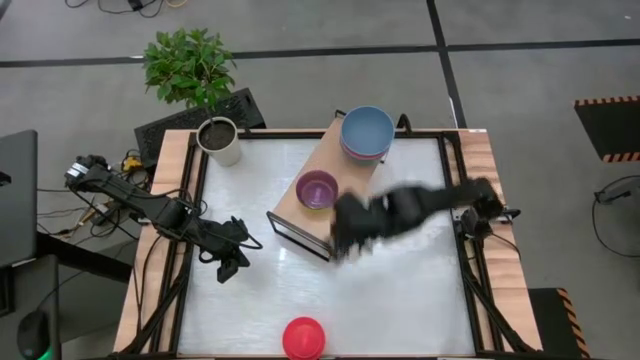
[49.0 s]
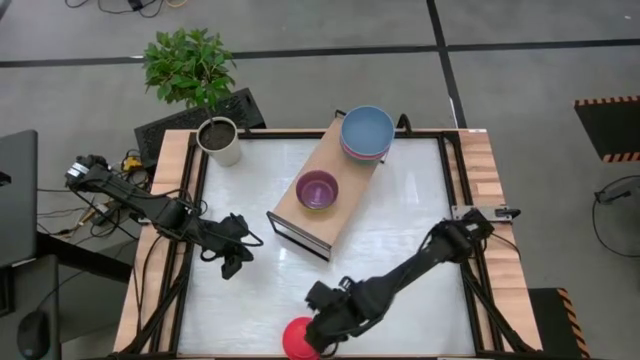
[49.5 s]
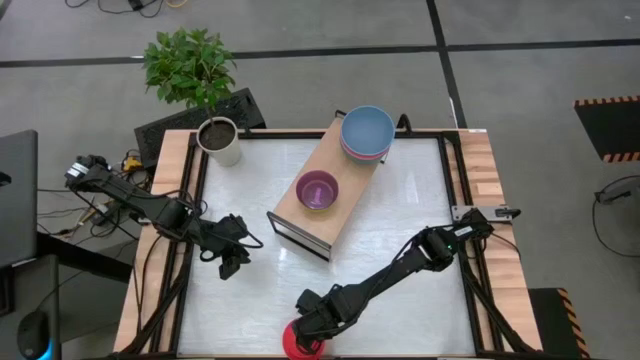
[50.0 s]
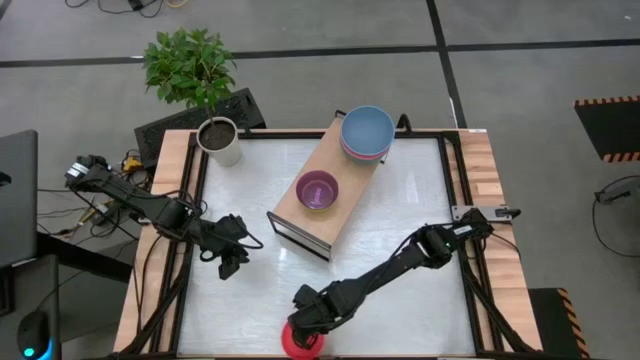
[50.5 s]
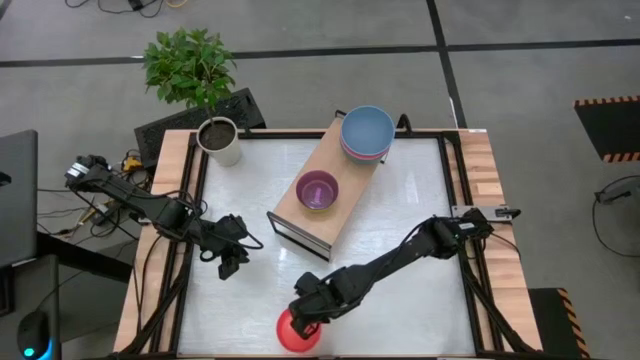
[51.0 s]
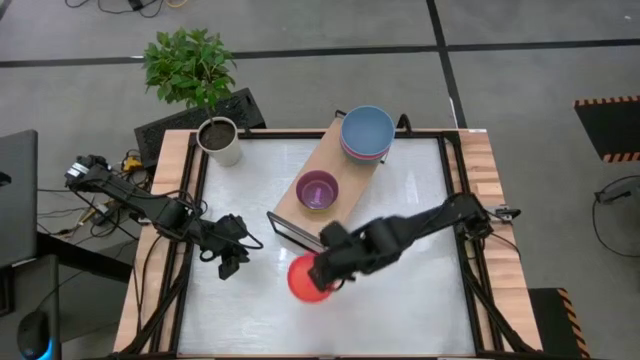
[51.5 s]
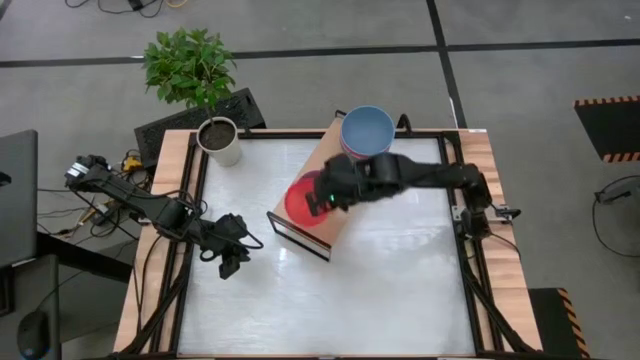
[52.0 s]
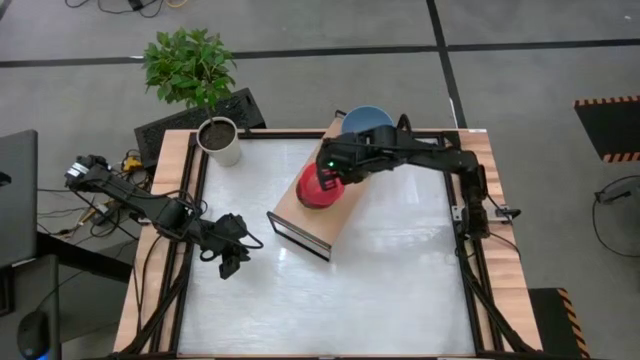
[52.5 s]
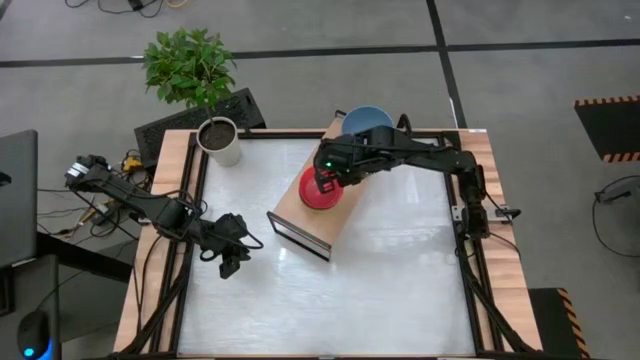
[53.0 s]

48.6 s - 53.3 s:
Task: Place and stack bowls onto a shelf
Stack the orange bowl into the purple bowl

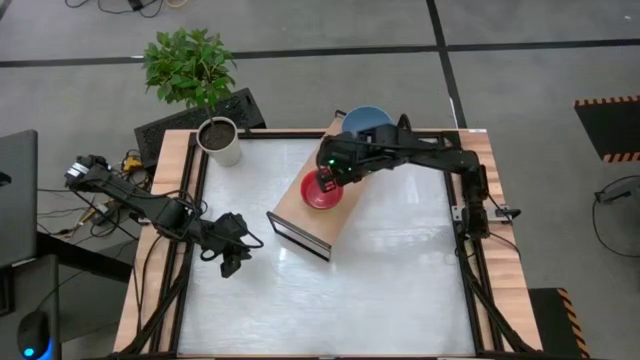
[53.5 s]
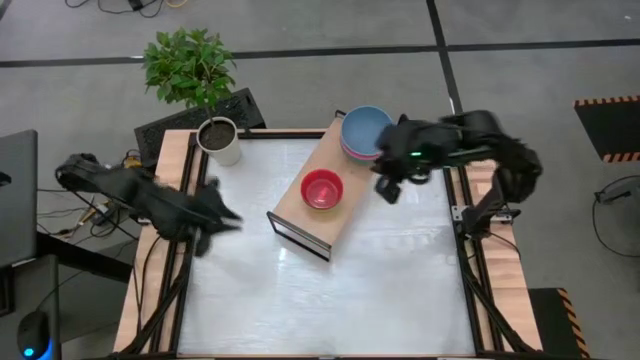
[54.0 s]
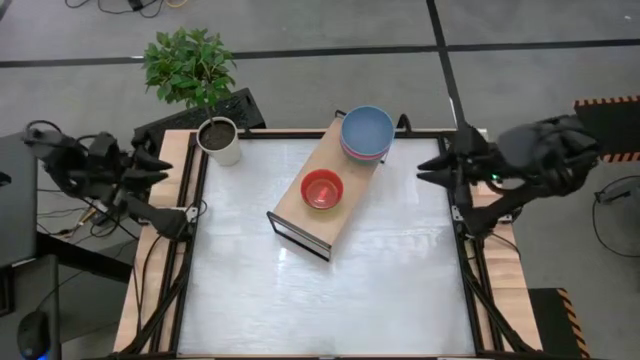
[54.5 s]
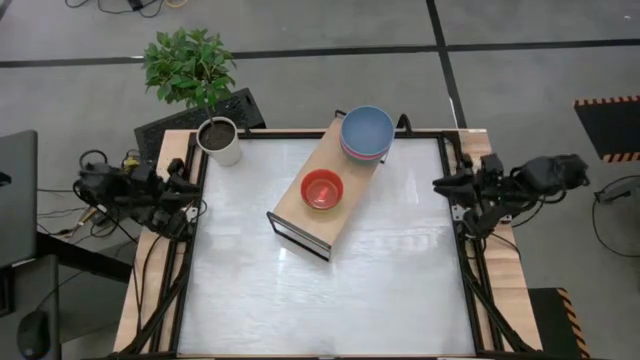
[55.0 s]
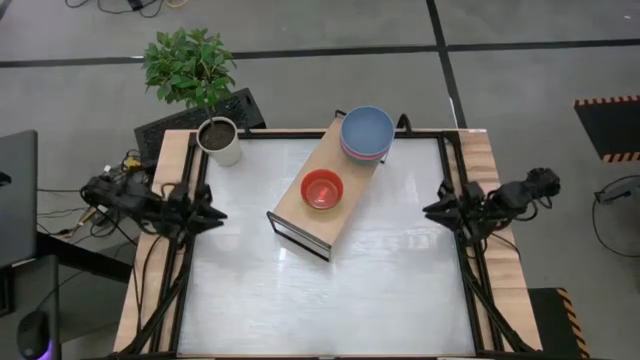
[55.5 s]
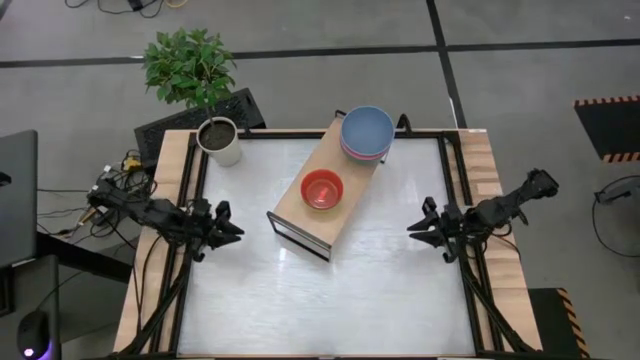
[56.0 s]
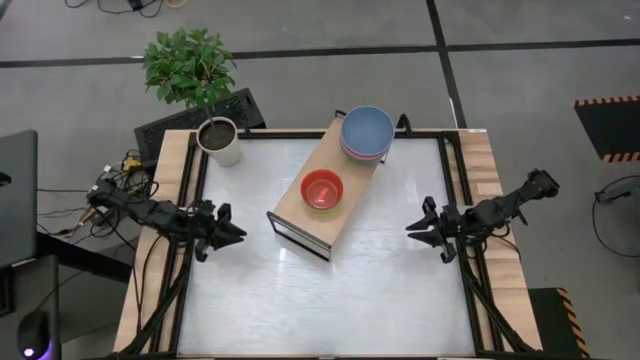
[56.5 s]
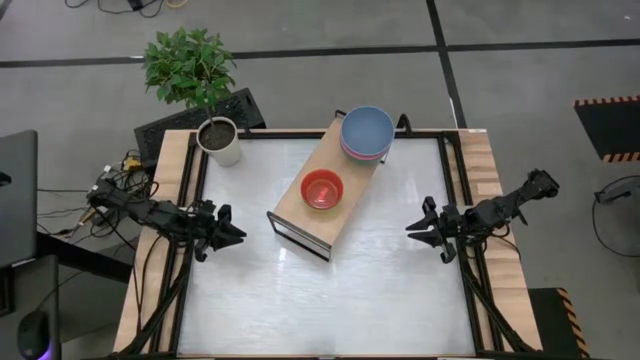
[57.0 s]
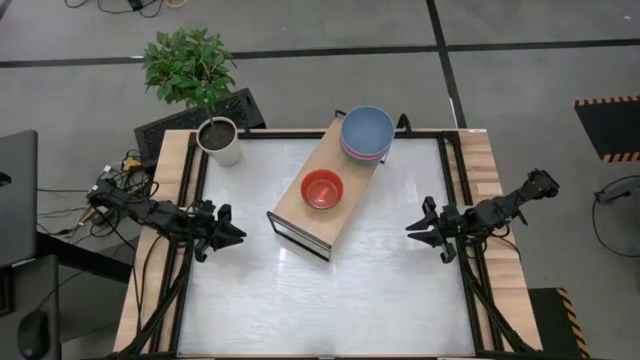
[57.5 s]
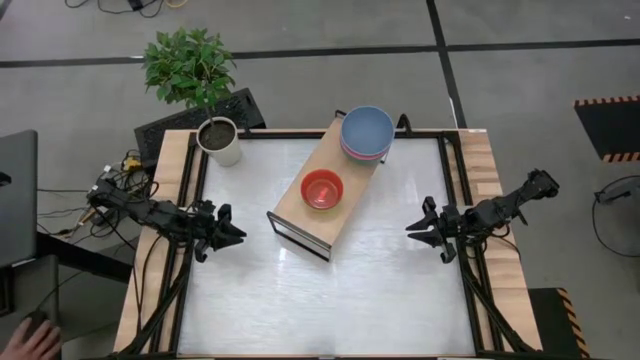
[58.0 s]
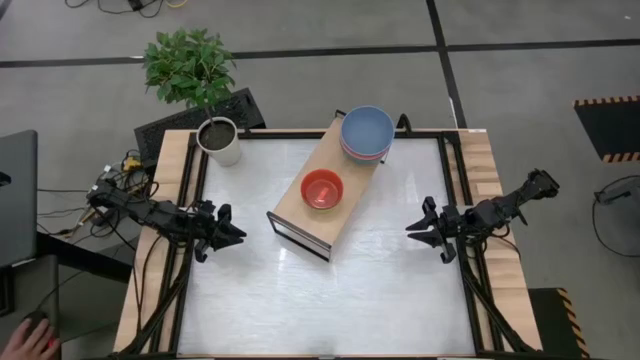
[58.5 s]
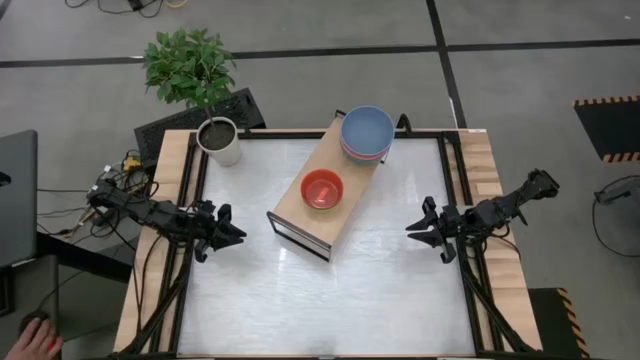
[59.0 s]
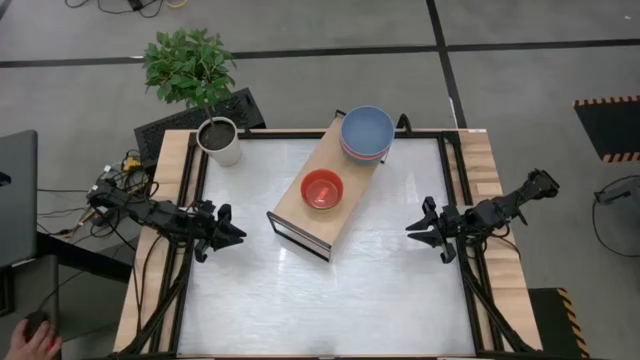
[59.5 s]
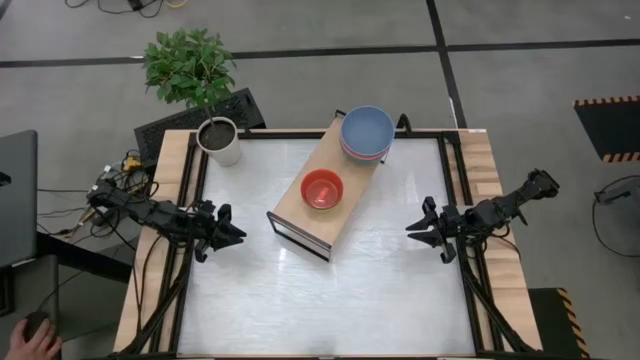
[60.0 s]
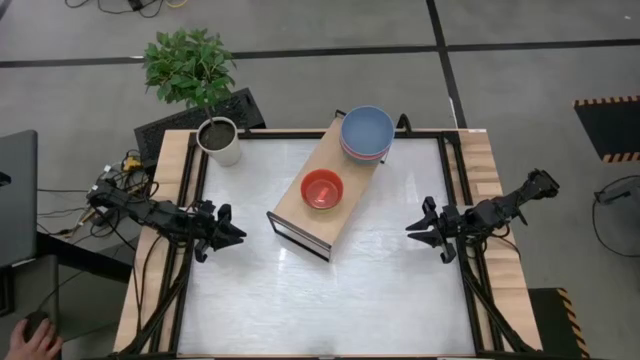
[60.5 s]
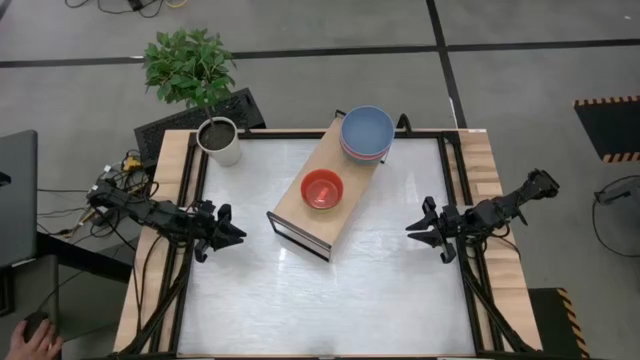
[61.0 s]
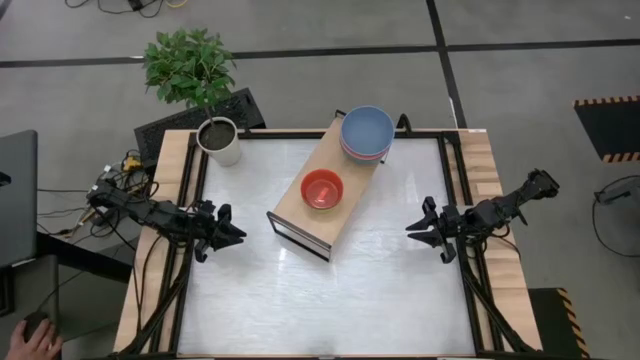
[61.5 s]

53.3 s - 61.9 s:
Return to Home Position

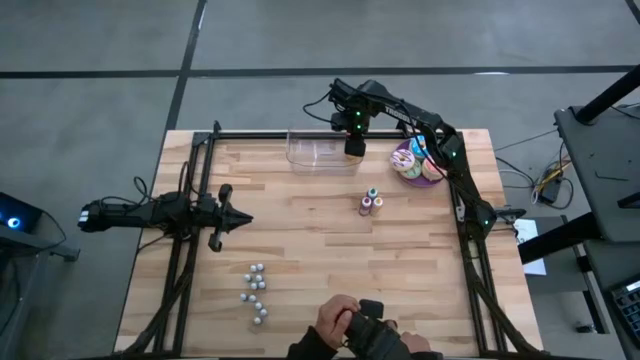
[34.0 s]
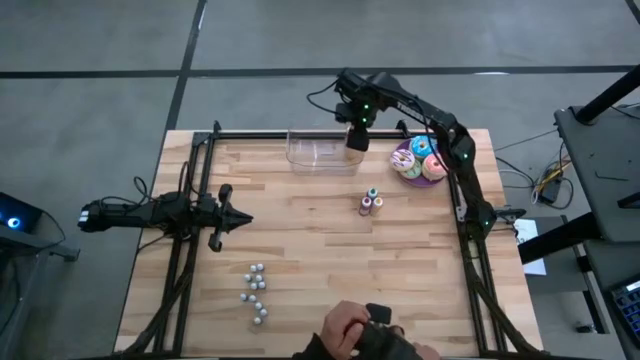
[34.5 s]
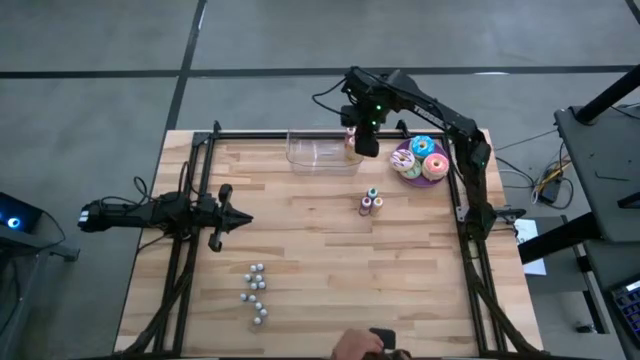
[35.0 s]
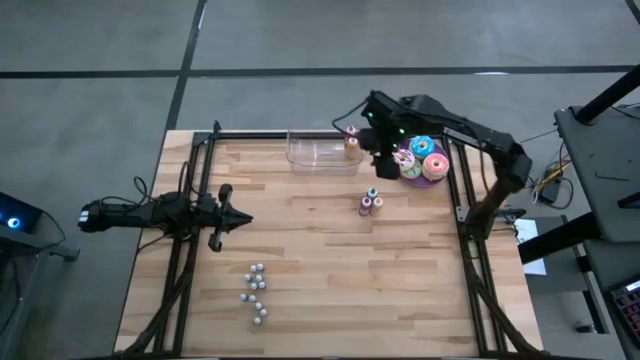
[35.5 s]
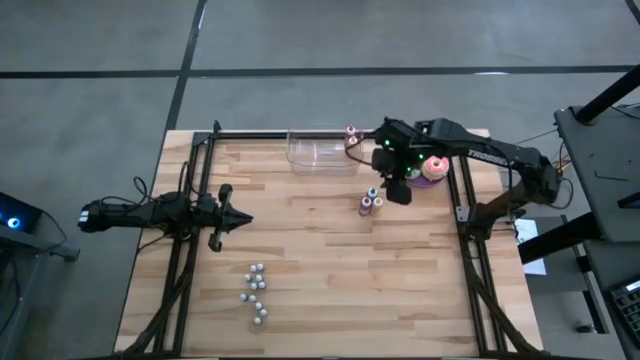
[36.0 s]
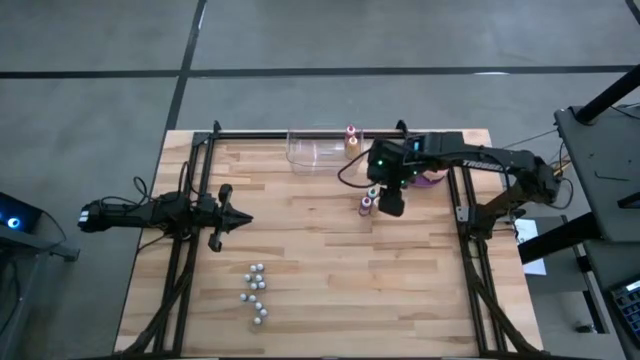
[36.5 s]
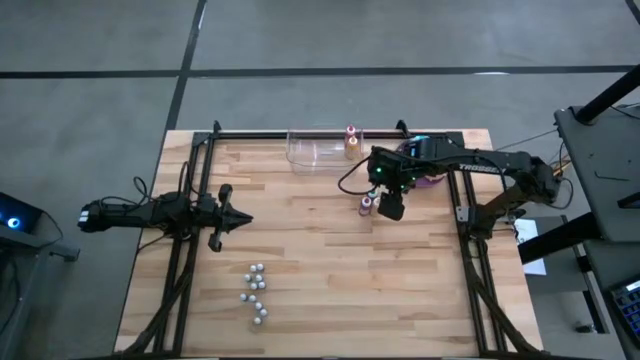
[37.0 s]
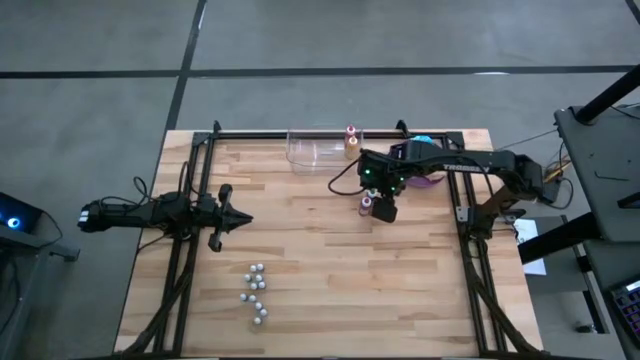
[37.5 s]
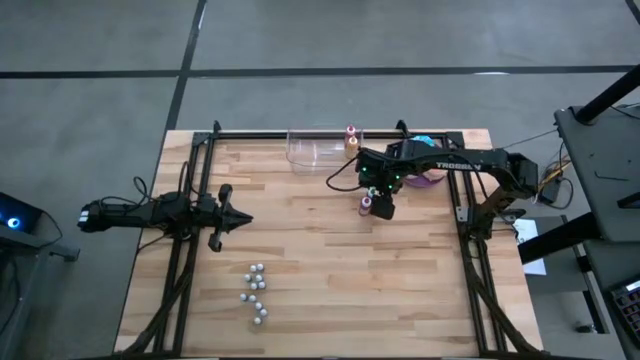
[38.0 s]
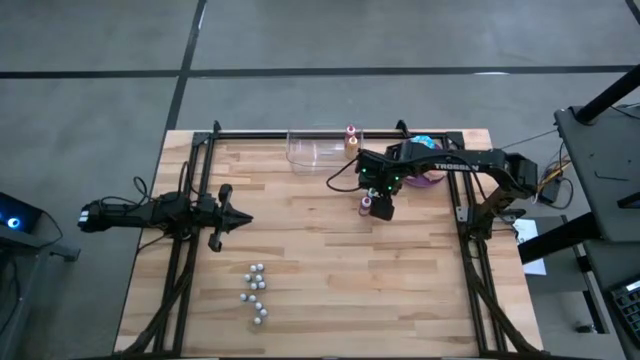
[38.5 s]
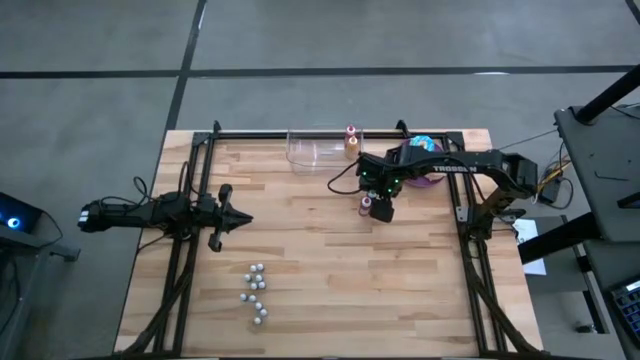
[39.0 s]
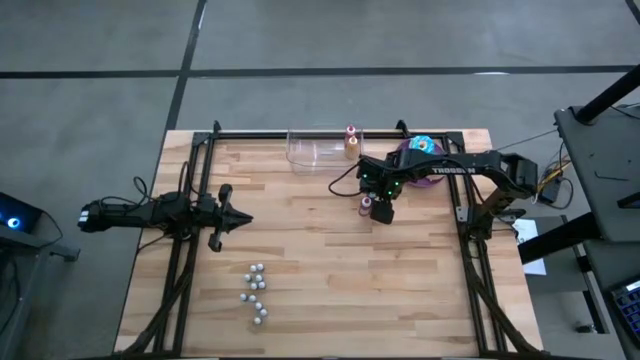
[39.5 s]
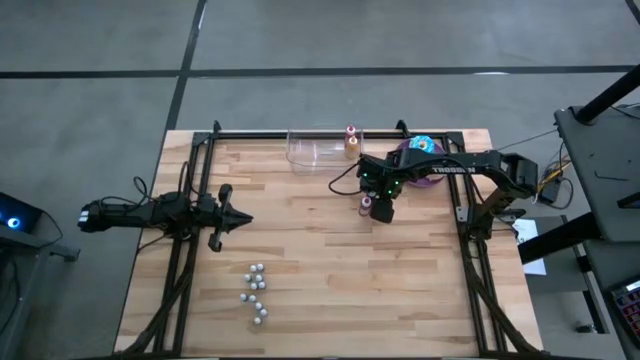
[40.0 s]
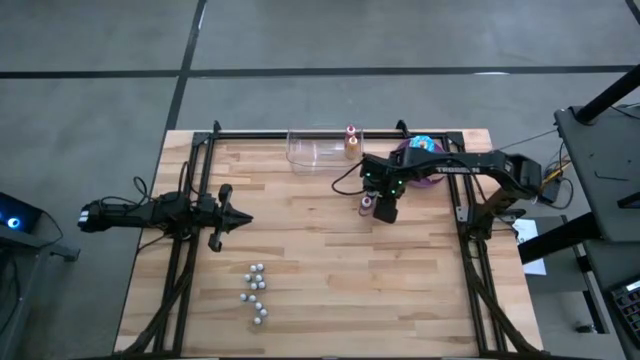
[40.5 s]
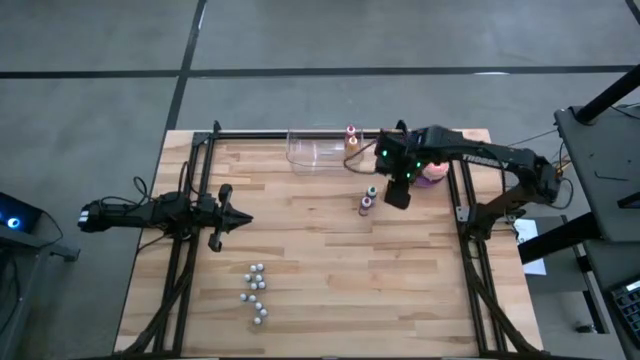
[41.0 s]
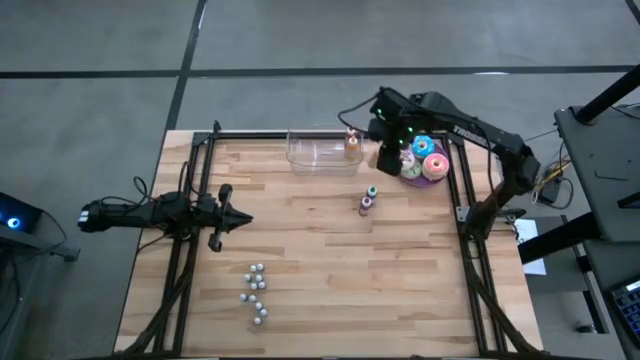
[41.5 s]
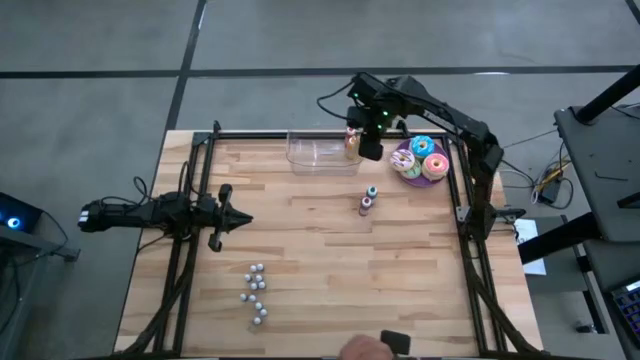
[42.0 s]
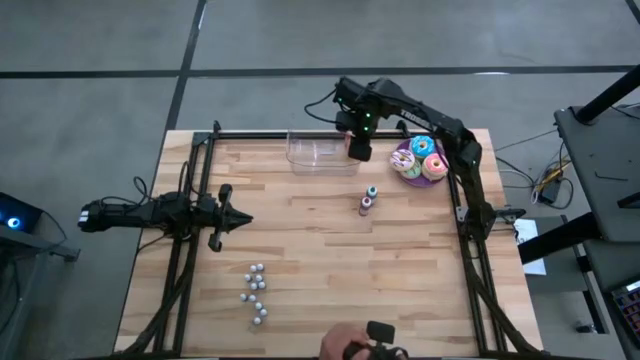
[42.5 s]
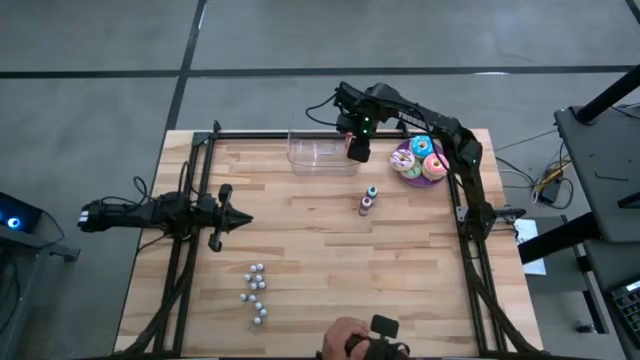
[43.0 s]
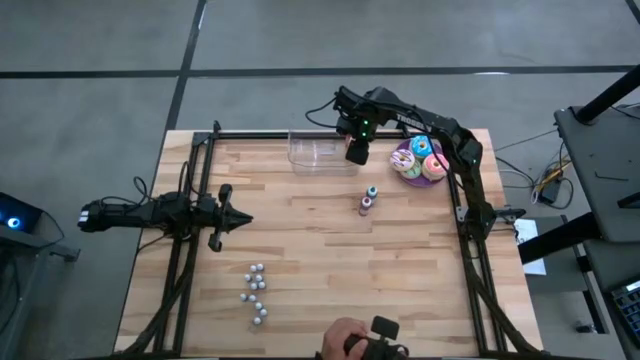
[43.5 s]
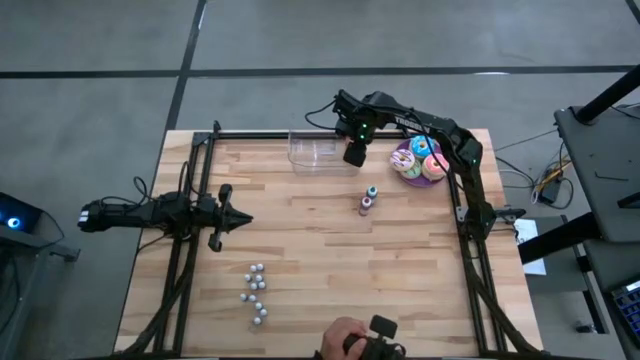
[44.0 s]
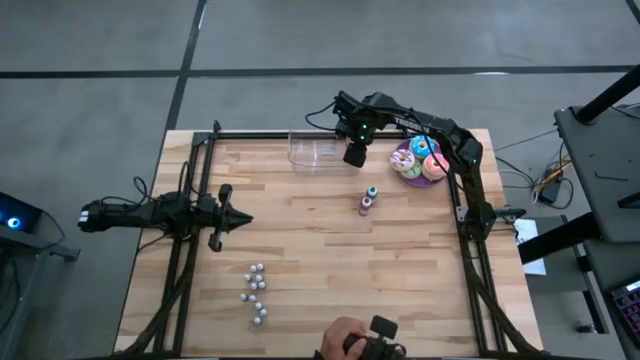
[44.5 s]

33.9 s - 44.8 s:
Task: Pick & Place food coloring
Put the large yellow food coloring bottle into the transparent bin
